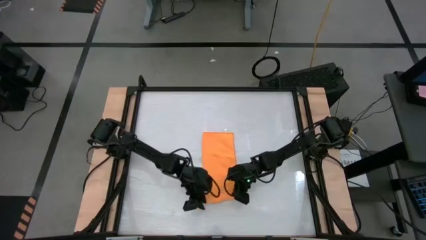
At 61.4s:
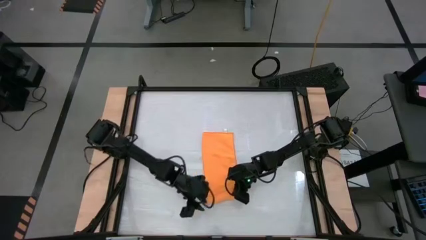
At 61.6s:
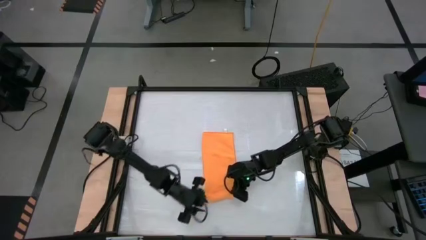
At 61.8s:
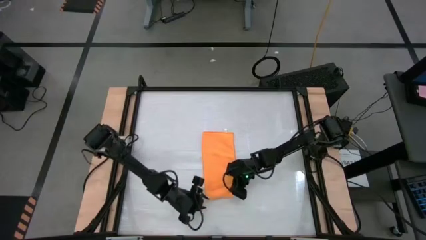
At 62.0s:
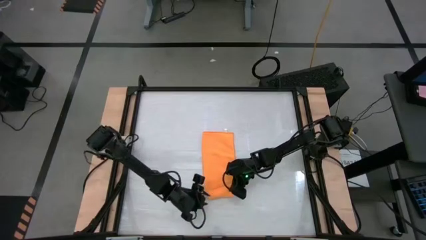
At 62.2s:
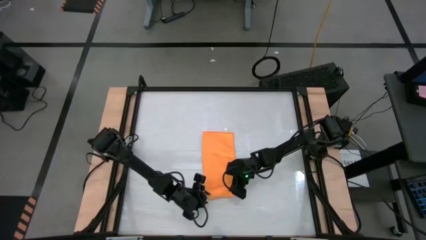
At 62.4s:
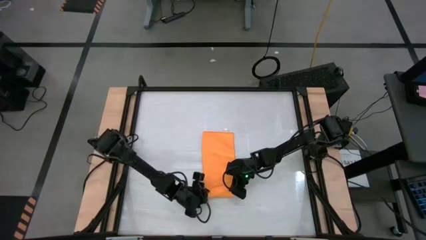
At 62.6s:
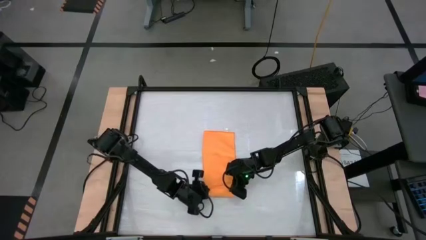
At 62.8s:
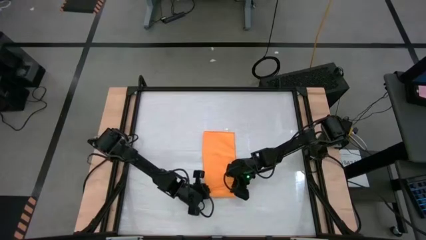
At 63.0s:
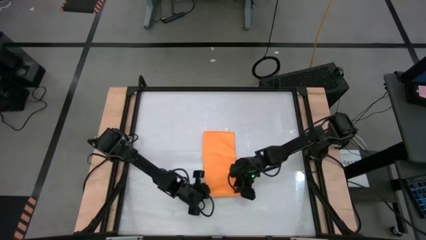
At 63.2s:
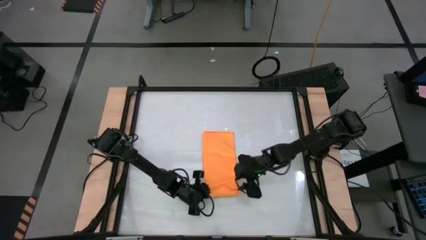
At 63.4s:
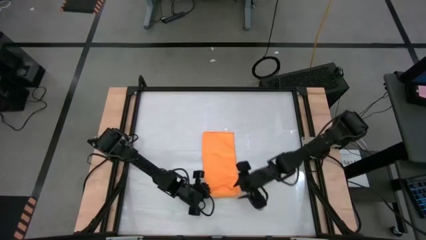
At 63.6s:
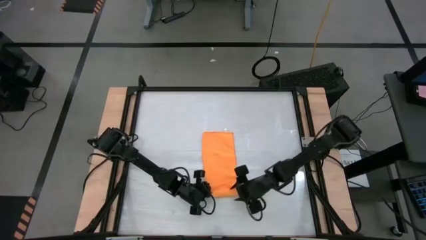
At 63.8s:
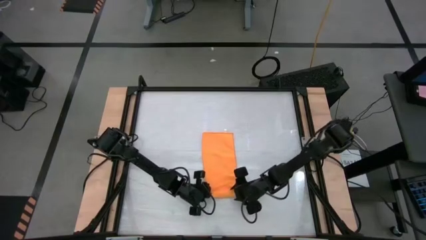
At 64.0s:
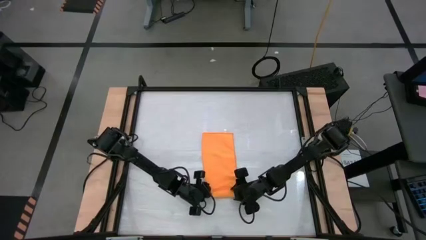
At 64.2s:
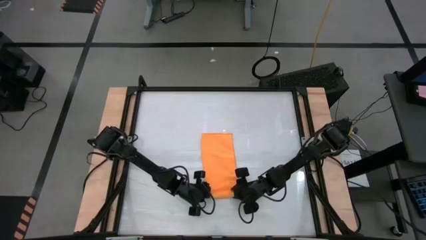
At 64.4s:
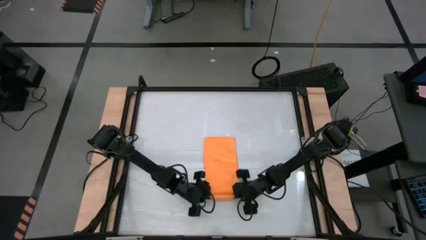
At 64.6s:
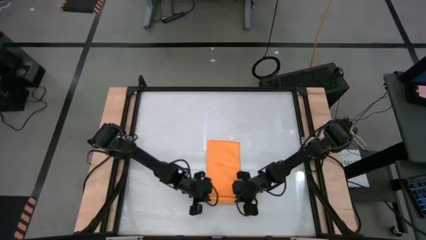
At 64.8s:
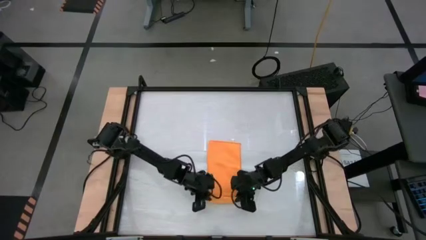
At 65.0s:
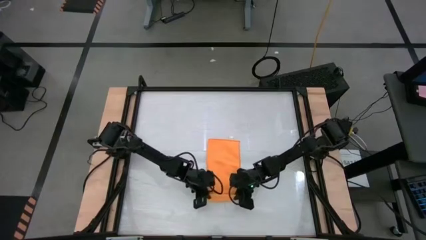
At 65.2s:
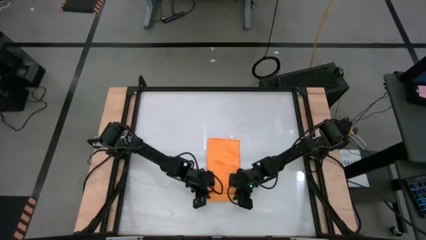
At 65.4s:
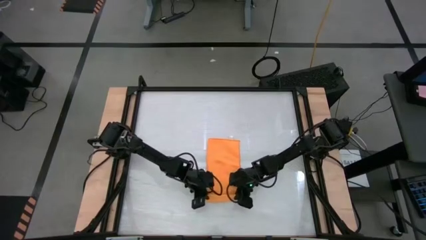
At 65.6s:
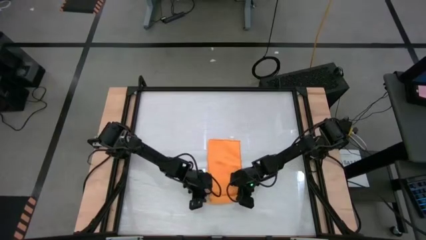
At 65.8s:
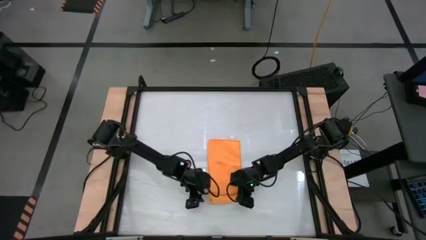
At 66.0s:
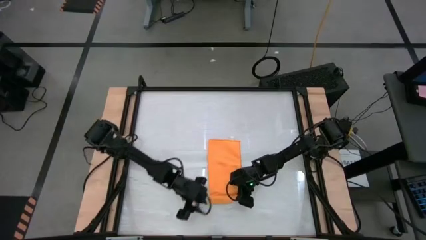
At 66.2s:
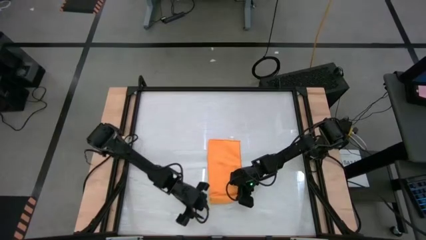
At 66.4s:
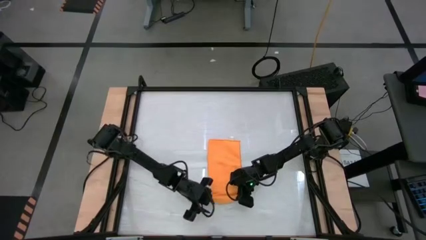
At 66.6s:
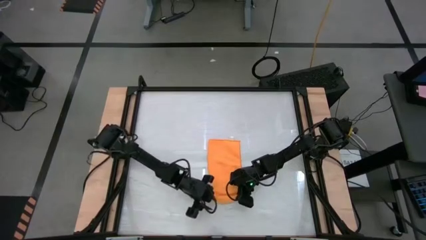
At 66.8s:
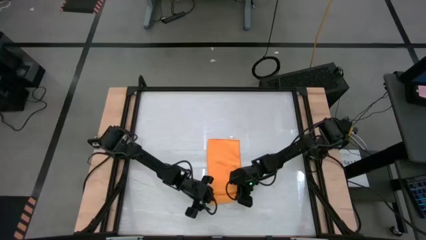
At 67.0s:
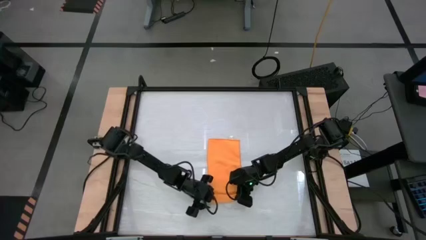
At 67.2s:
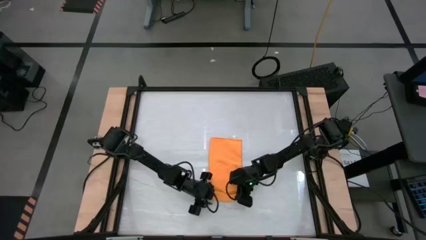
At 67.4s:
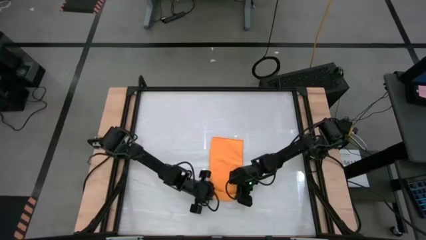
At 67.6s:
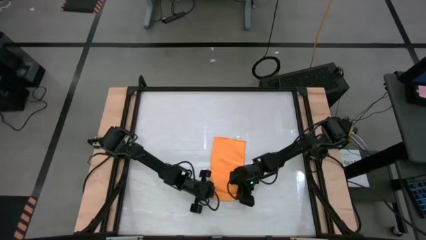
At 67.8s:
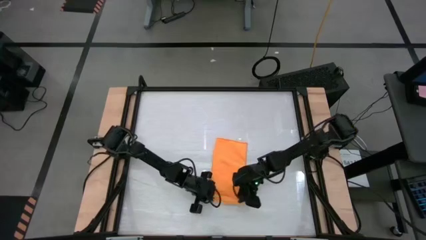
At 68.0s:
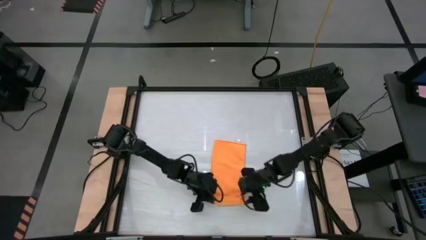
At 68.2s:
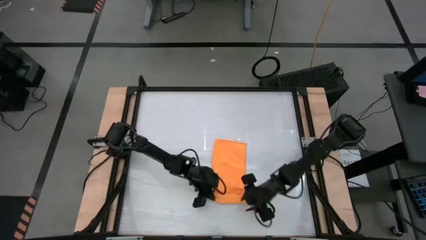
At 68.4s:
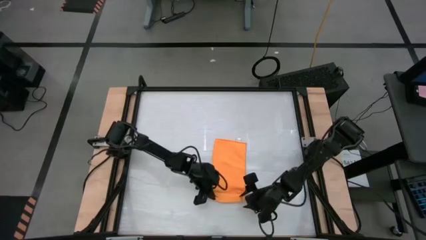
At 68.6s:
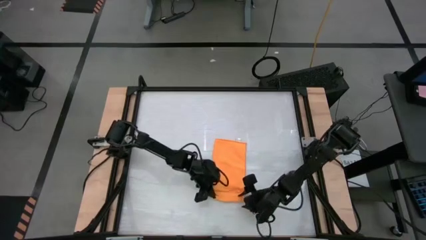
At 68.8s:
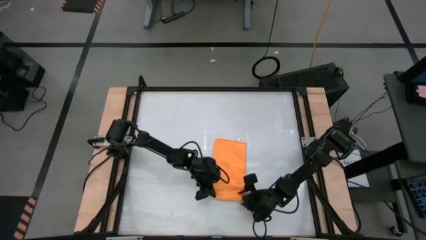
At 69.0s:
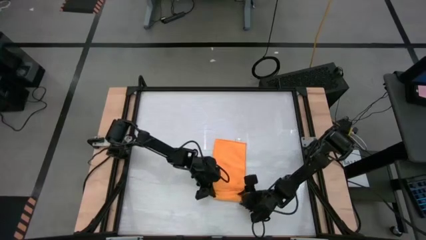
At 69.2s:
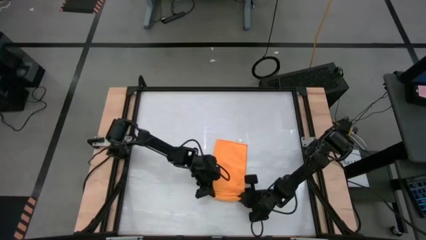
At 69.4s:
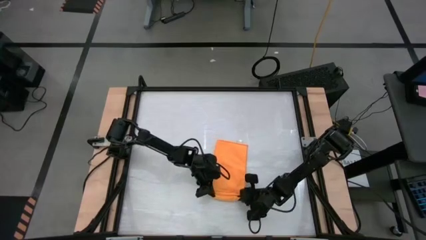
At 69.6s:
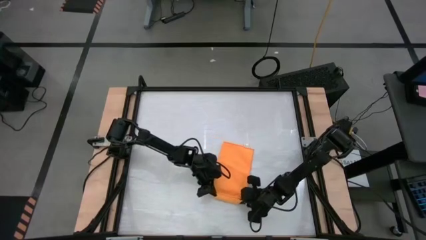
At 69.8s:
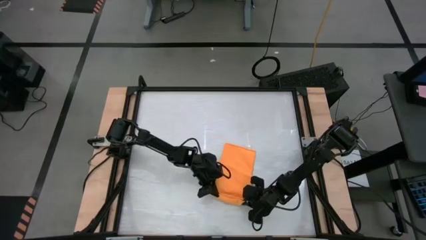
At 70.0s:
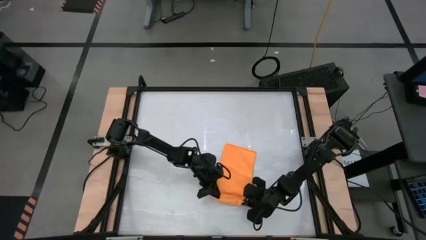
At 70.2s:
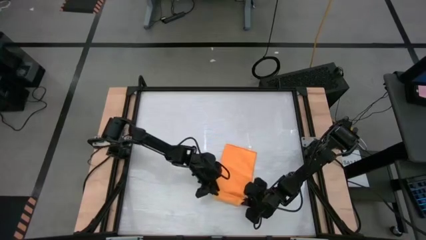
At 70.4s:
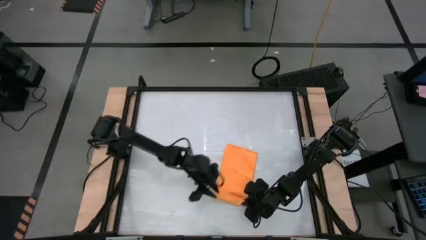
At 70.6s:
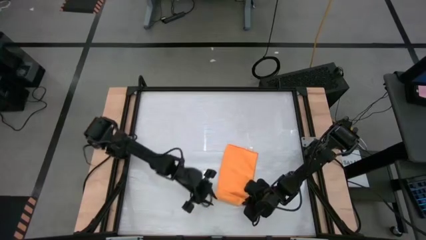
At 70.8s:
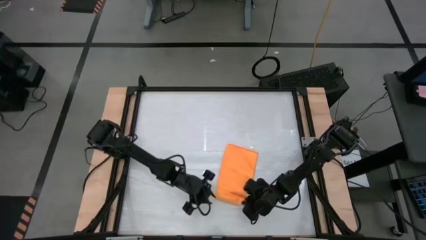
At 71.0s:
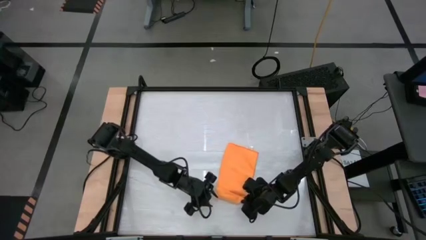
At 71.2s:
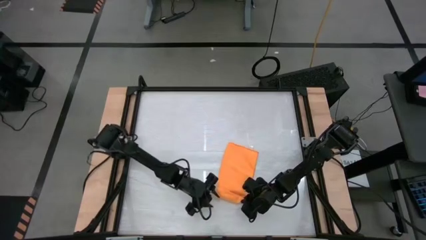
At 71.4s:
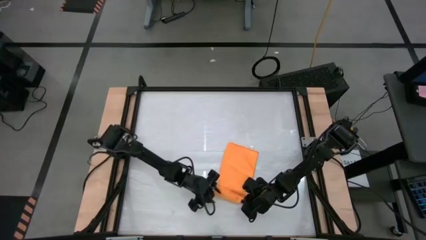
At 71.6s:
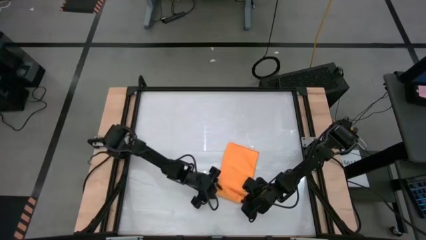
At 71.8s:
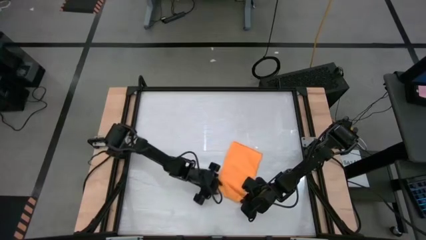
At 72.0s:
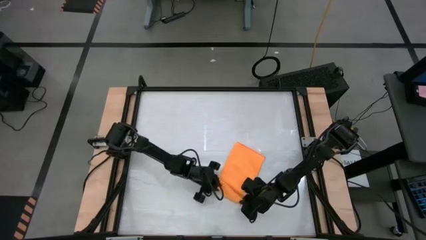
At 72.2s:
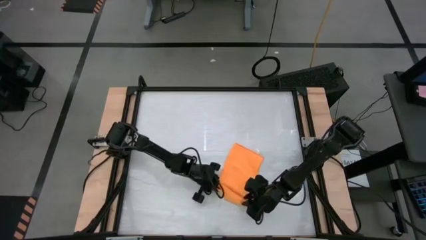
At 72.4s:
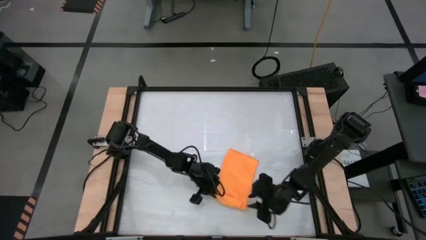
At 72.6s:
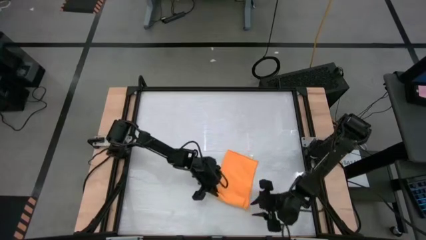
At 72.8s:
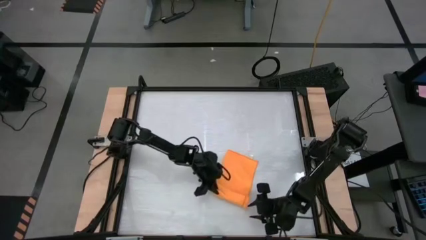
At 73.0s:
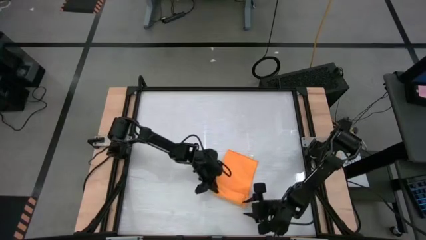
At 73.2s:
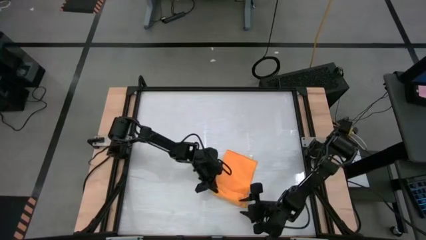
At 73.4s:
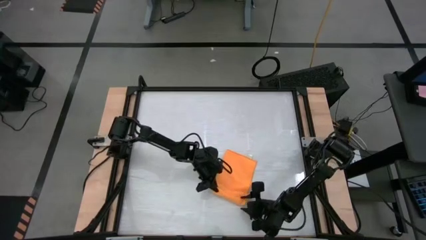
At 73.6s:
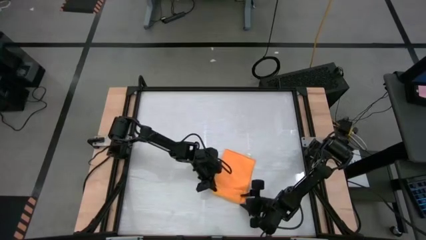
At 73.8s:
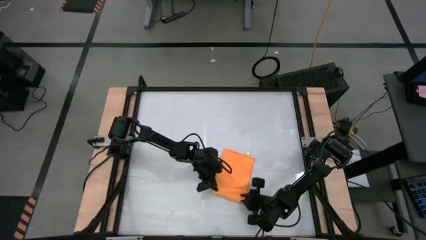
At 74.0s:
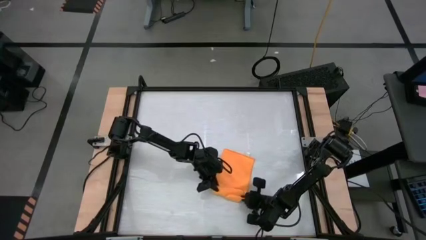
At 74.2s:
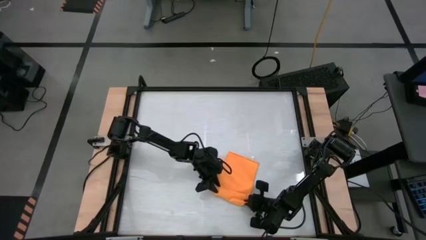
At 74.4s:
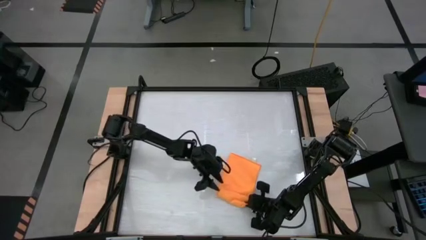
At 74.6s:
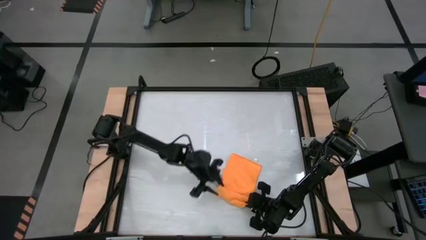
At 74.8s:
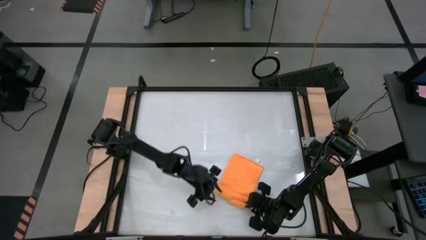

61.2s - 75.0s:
Task: Roll towel
Roll the orange towel
